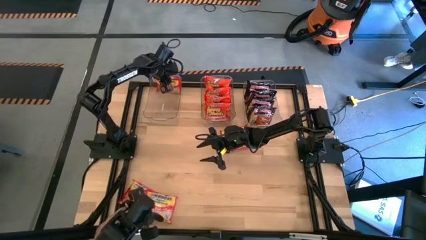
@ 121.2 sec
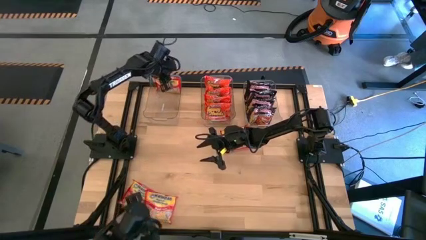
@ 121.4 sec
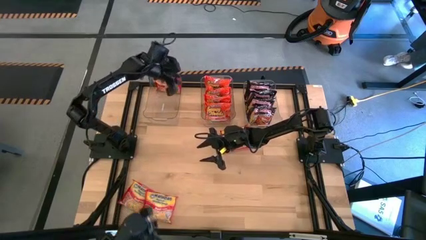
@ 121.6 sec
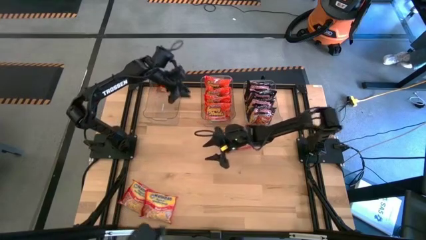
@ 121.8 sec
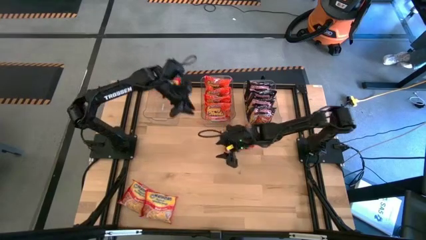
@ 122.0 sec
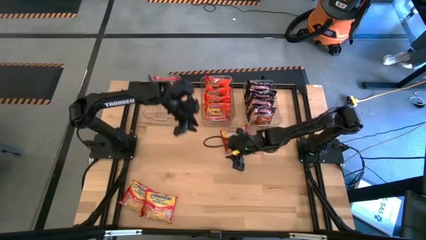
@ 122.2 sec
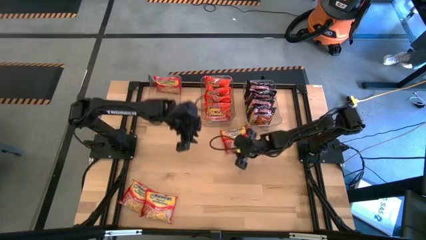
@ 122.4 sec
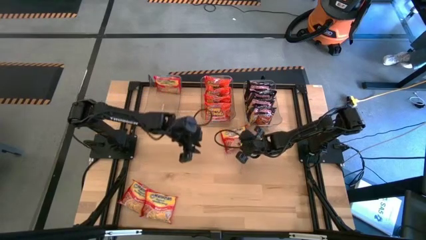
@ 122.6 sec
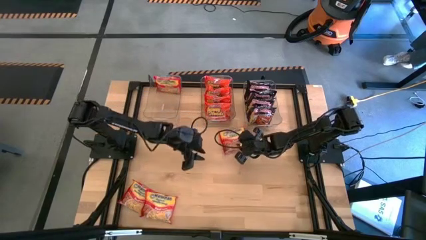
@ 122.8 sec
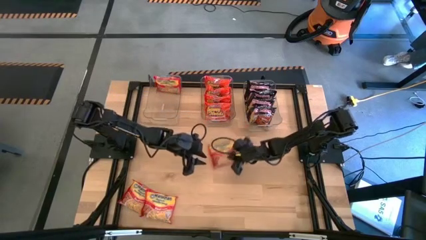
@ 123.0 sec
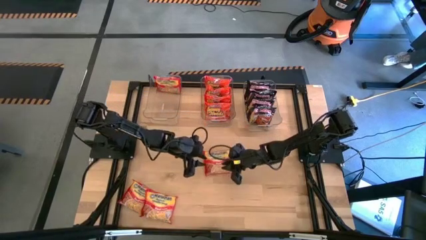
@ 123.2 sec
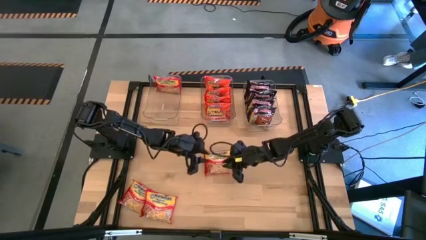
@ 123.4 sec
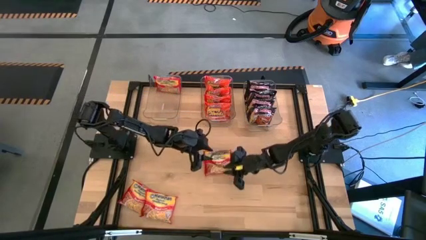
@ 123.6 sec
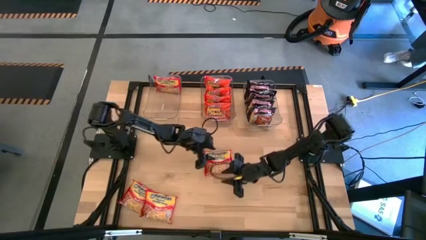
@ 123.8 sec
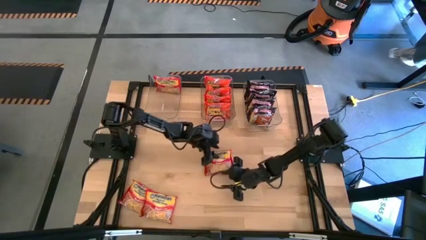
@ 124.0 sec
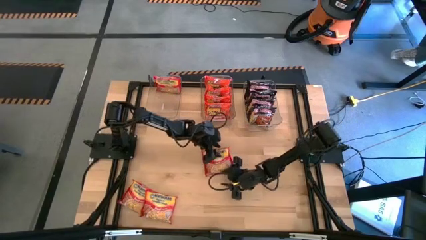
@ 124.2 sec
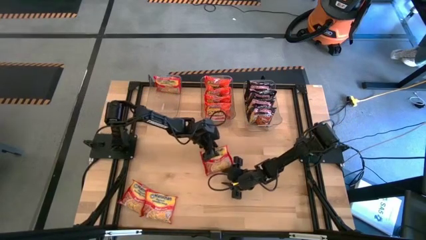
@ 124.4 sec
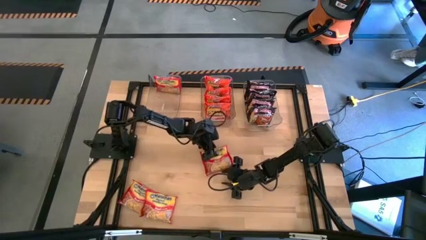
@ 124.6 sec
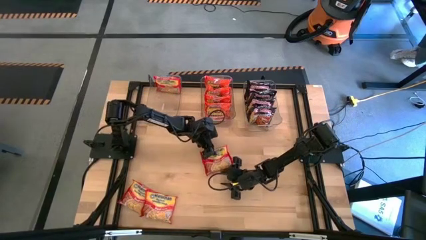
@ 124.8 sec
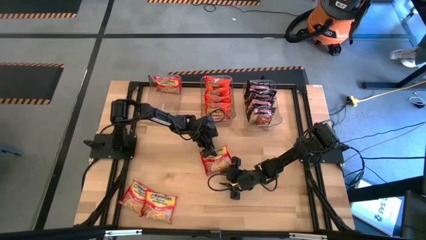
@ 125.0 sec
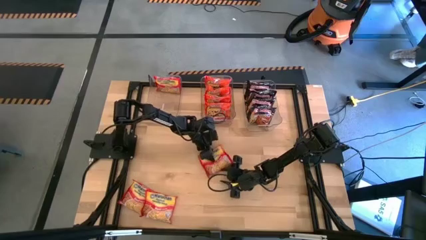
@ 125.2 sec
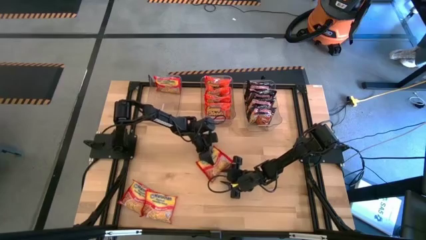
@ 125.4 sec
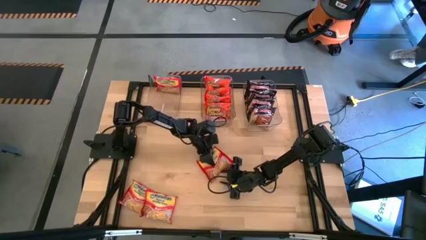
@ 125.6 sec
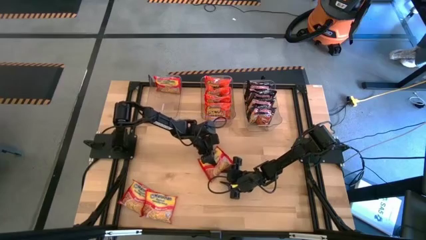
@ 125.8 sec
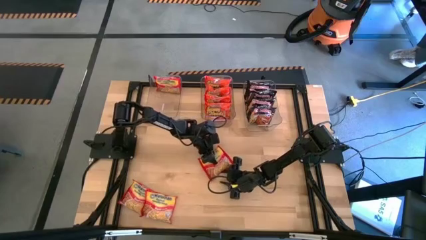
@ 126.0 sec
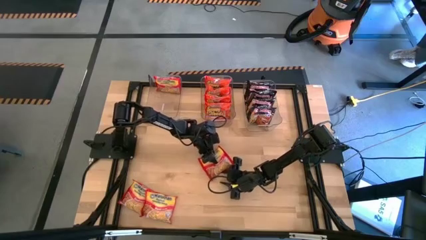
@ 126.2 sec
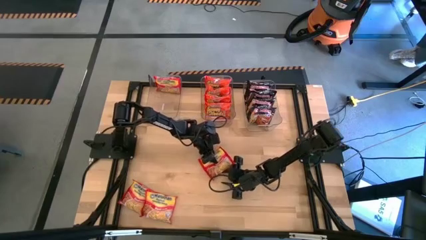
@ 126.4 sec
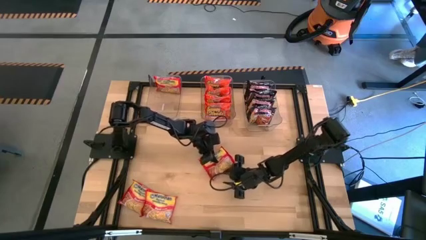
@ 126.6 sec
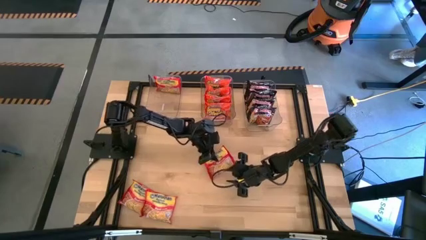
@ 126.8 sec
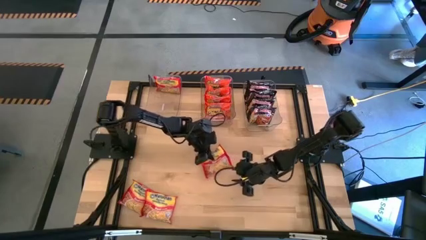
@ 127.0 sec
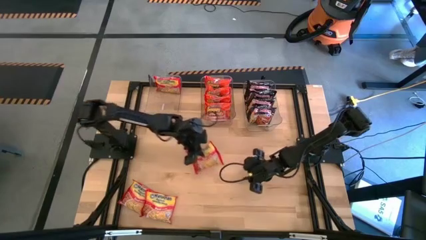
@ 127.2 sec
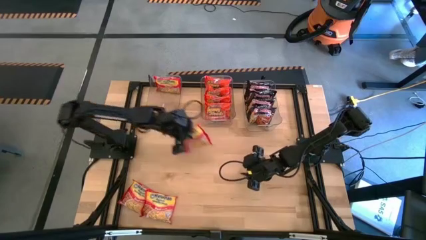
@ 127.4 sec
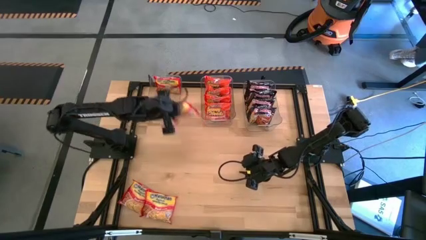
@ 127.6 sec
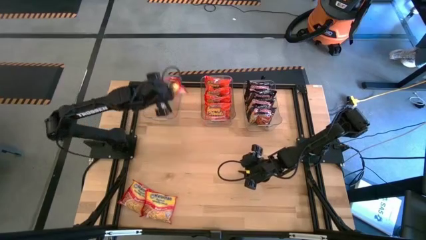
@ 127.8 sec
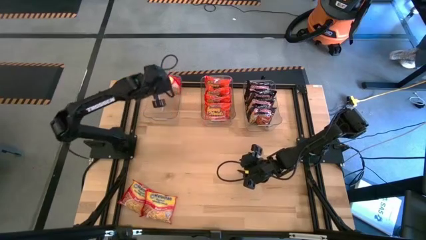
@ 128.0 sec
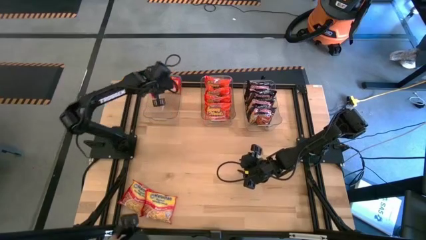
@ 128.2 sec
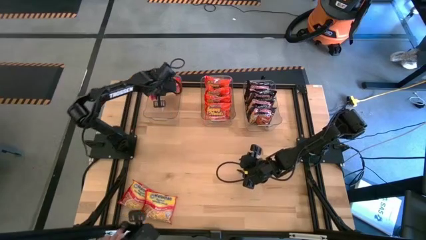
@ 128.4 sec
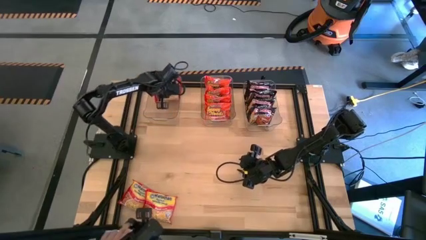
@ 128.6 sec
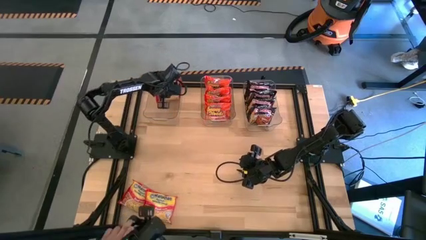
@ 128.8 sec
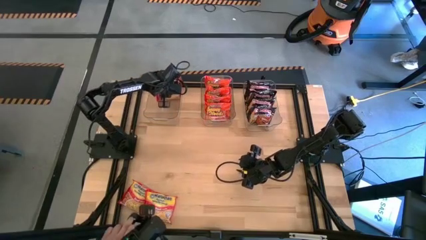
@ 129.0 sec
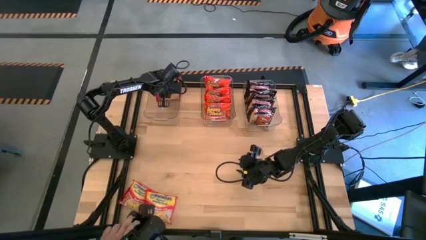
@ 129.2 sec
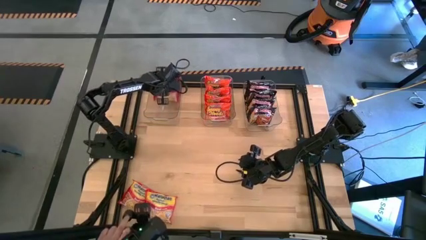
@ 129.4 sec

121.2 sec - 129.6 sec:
Task: Sort Maruchan noodles
Put the red noodle pack into the left transparent bin

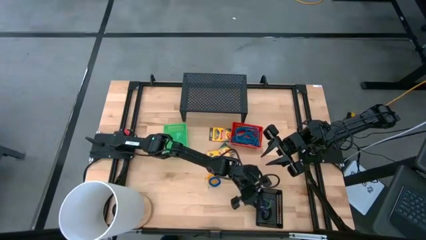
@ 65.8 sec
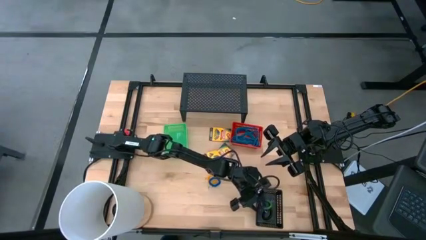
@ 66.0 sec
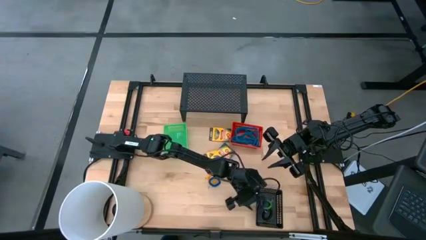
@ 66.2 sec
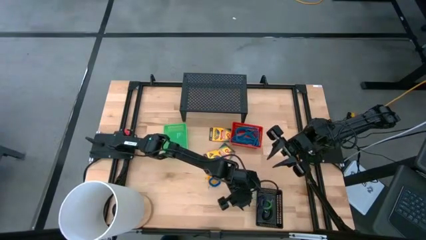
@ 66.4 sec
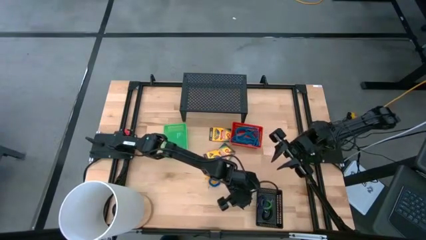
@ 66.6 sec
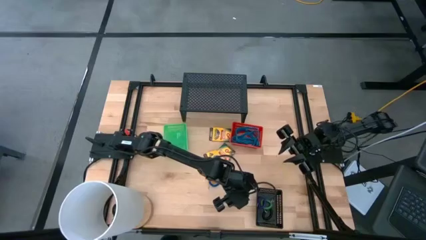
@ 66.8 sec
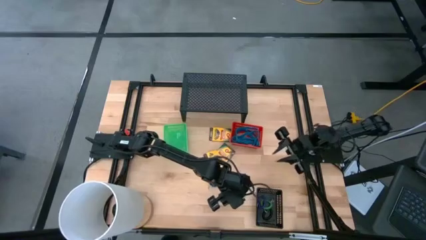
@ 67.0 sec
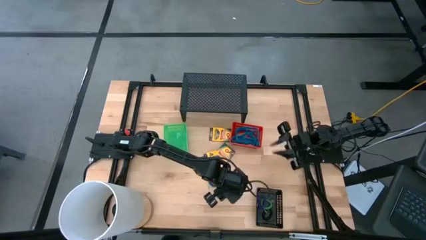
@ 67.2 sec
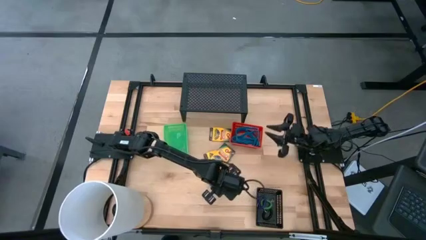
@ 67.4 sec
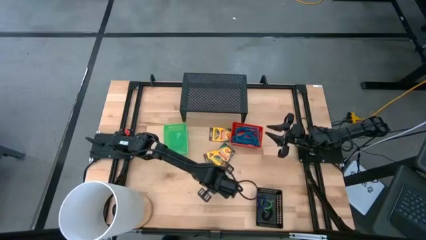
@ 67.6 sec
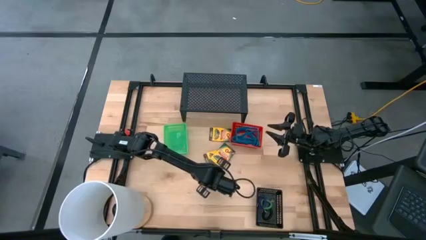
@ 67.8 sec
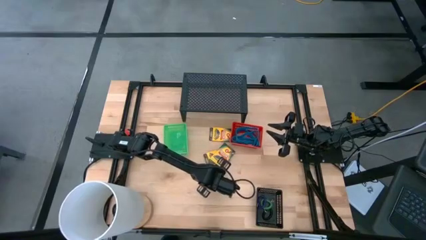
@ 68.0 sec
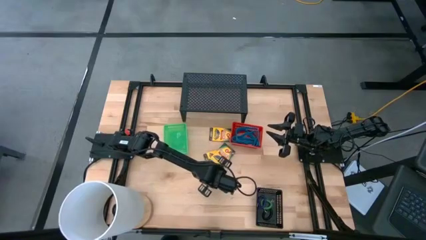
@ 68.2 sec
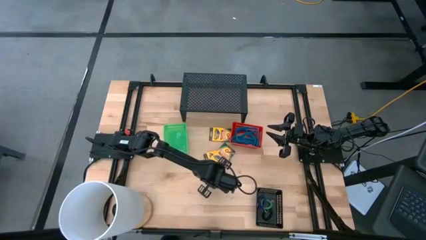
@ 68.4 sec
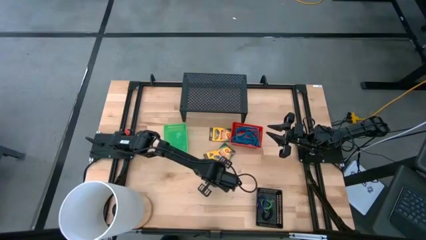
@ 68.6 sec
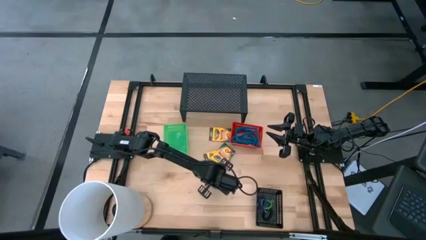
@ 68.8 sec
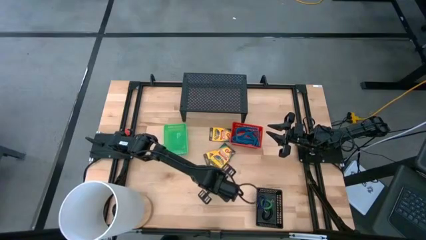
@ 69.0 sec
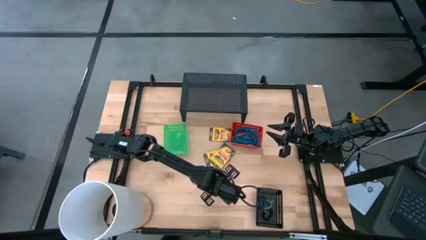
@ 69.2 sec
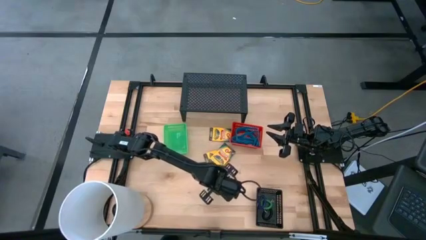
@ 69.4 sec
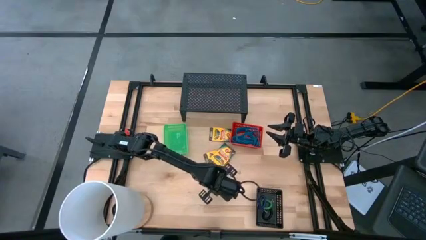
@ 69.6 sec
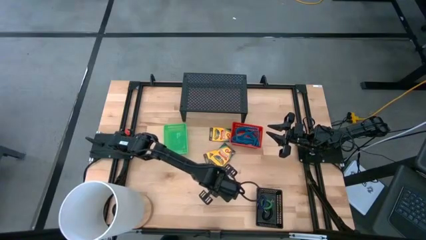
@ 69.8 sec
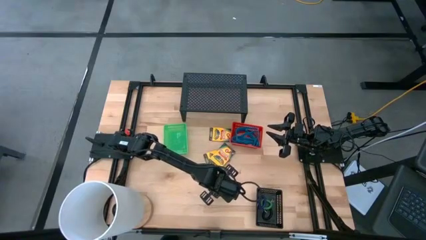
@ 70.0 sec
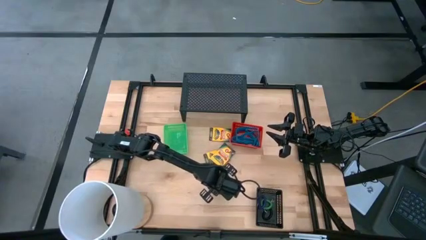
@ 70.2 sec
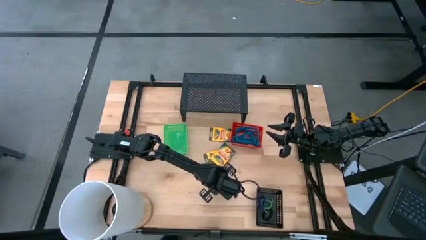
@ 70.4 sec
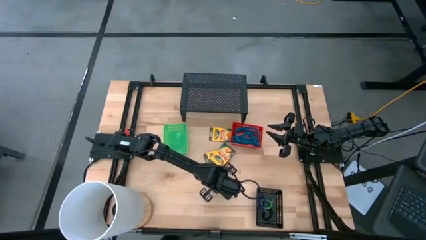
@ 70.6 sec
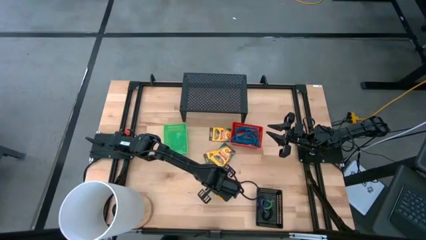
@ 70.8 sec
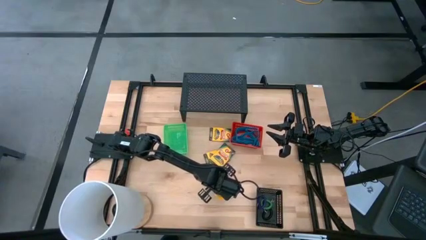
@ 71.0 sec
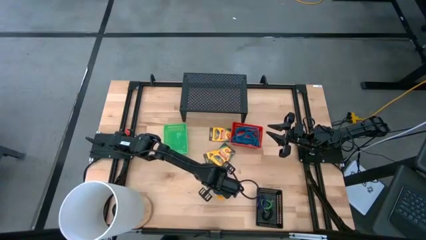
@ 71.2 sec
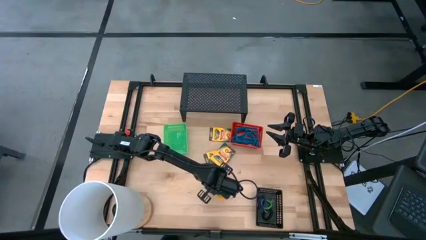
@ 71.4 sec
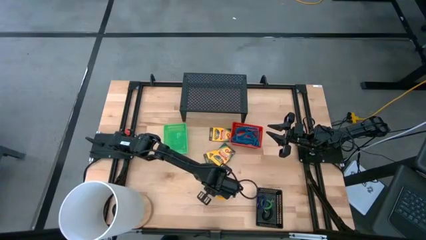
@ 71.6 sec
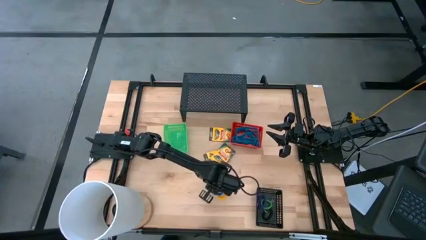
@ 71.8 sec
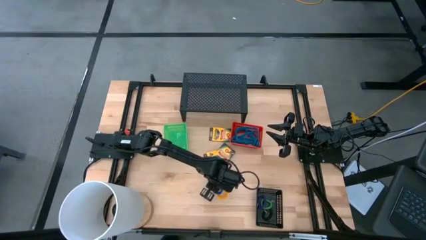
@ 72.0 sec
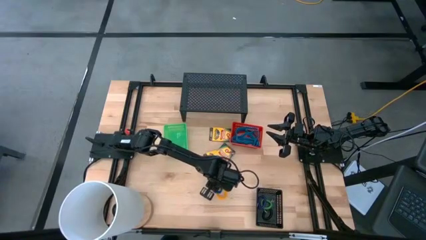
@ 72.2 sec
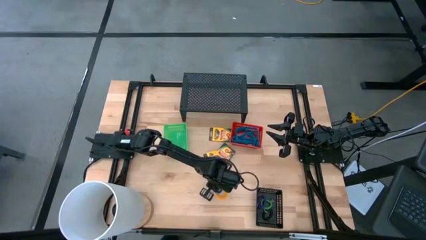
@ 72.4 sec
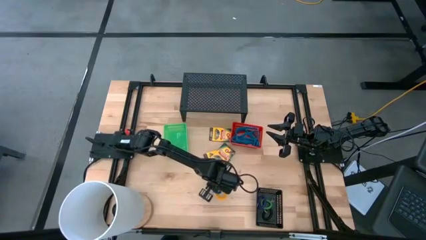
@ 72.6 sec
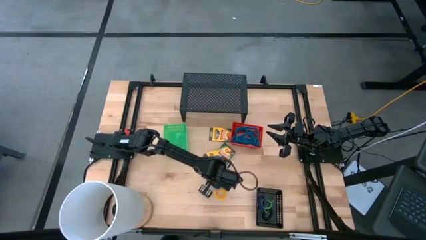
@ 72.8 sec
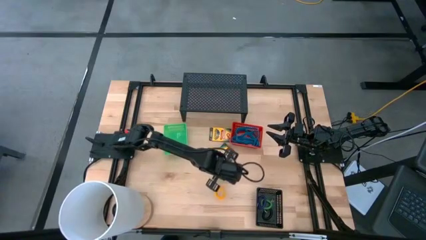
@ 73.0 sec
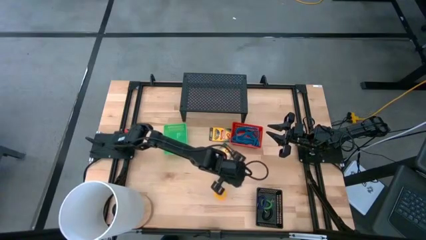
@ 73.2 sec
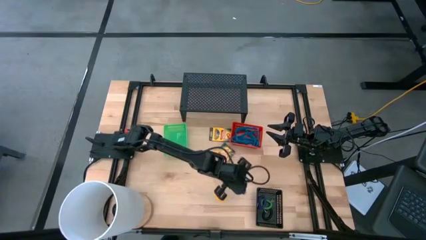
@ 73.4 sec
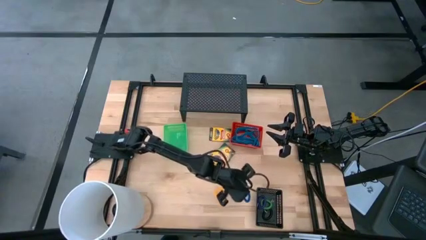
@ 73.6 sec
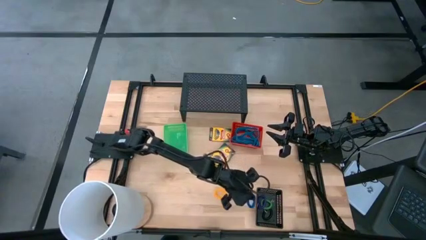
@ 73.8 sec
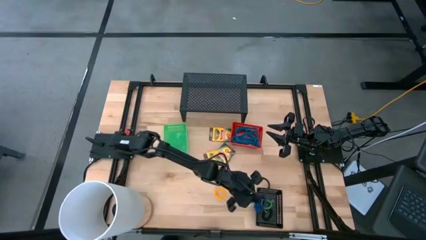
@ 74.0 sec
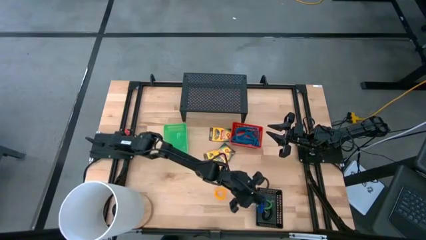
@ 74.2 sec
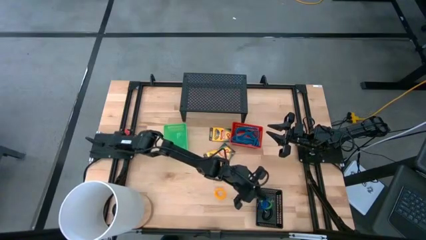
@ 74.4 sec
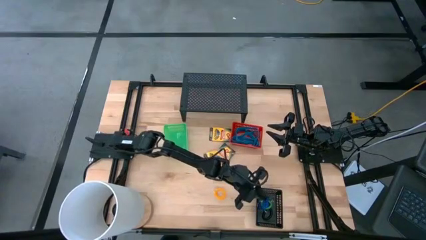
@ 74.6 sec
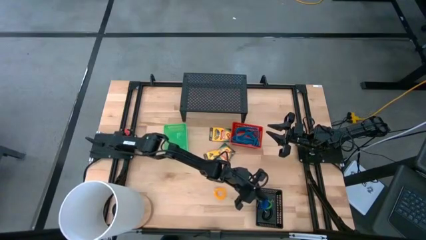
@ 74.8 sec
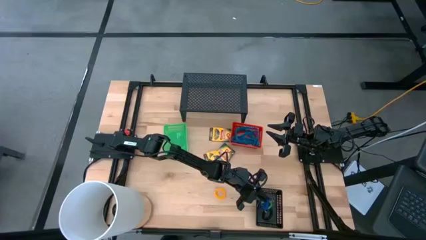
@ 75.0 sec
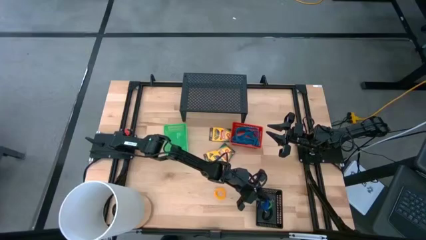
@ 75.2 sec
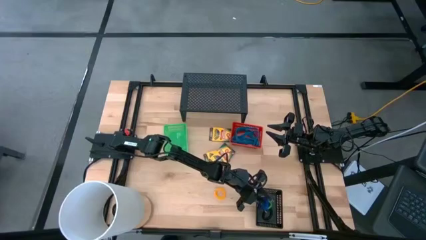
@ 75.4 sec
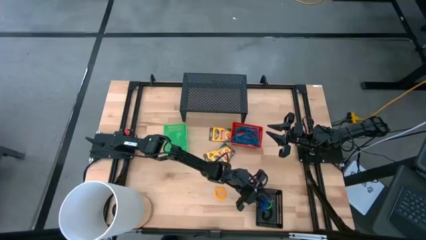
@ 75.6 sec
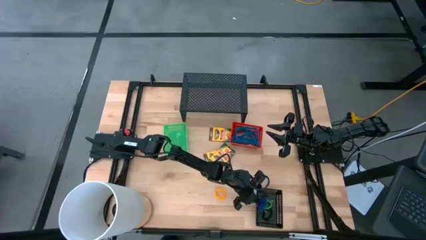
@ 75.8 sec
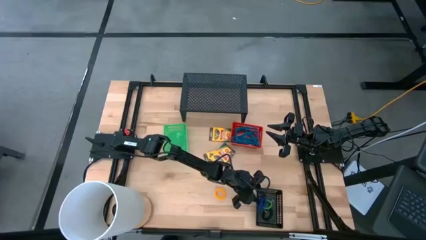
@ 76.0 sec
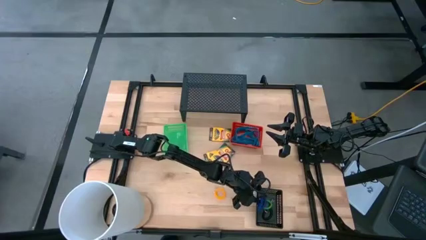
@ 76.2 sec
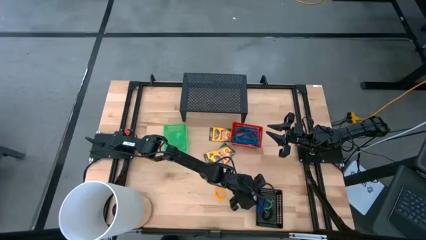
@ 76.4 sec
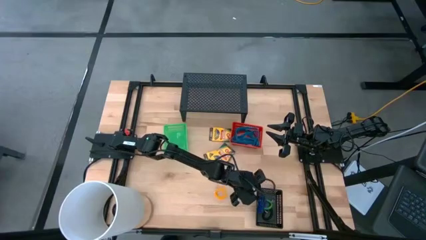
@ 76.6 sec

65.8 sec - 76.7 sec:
Task: Pick & Place Office Desk Supplies
Put the blue spring keychain into the black bin
